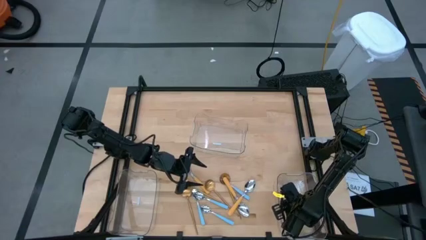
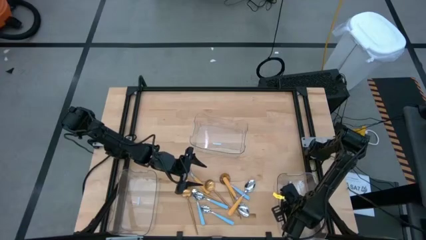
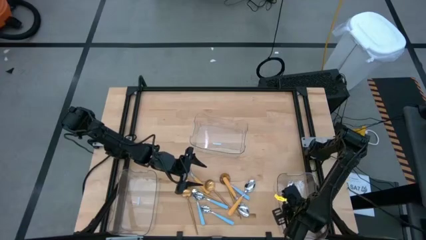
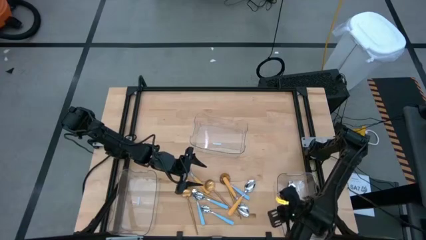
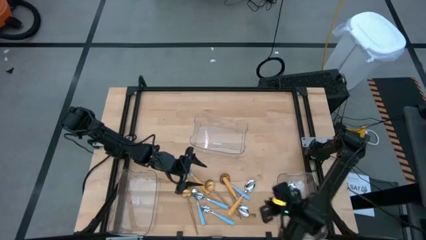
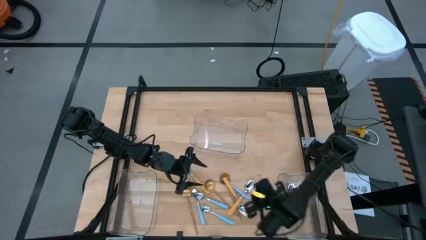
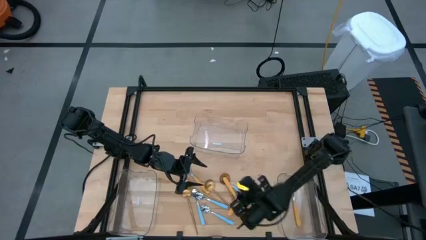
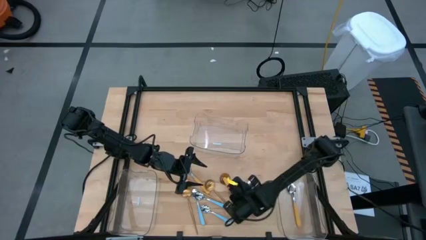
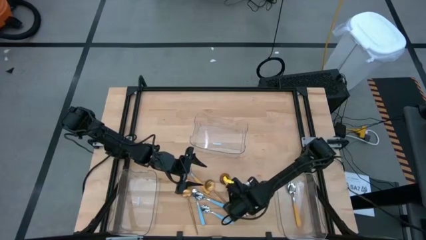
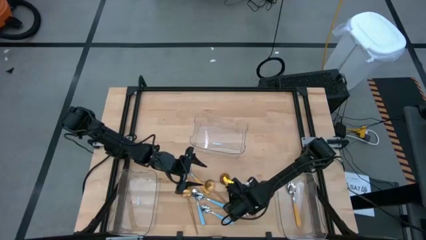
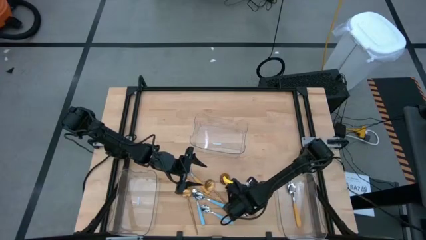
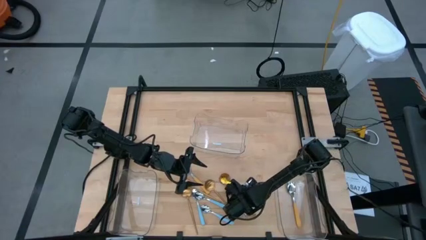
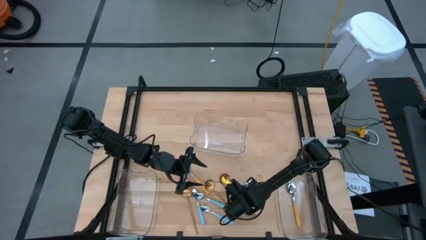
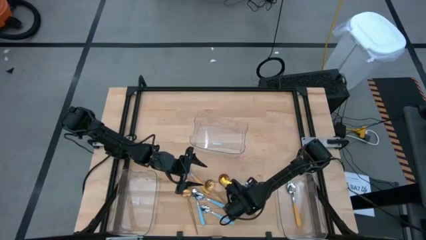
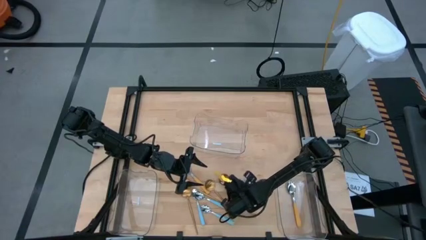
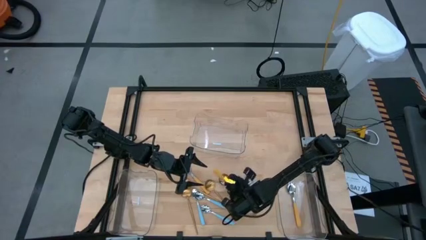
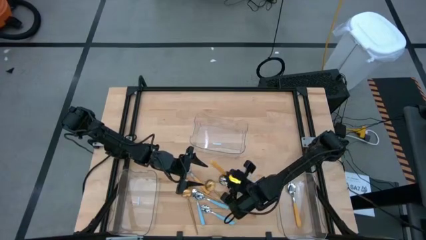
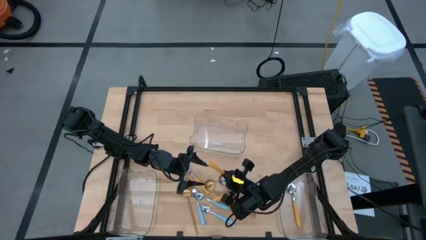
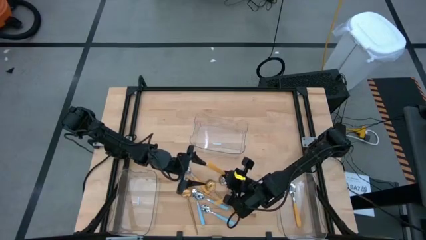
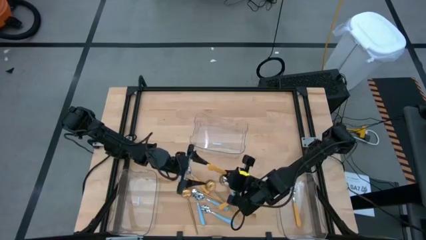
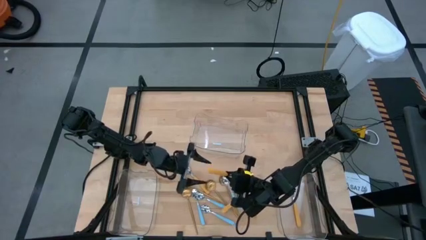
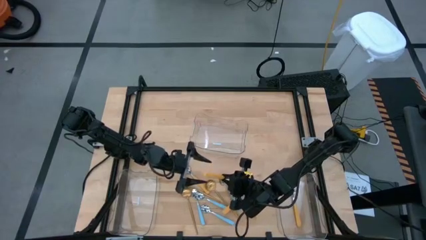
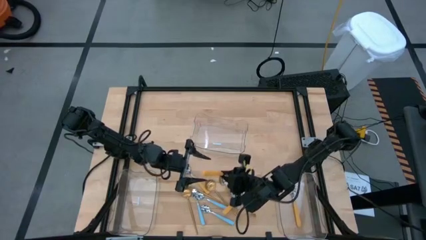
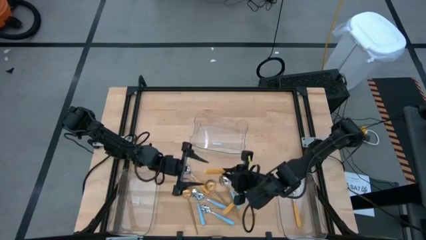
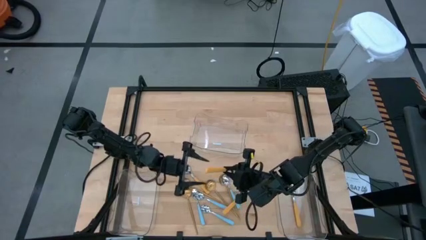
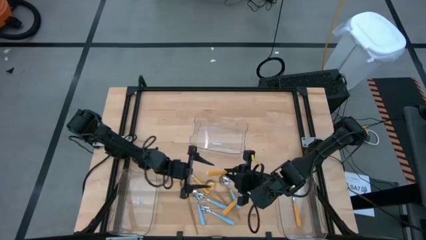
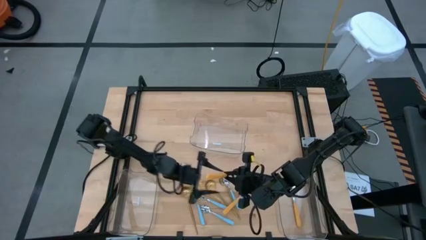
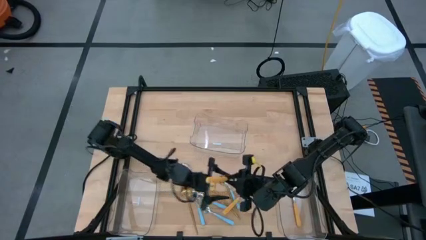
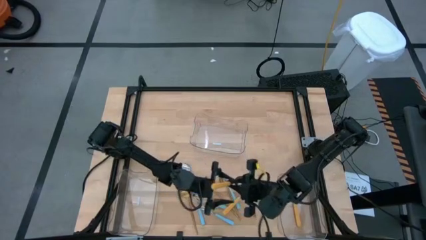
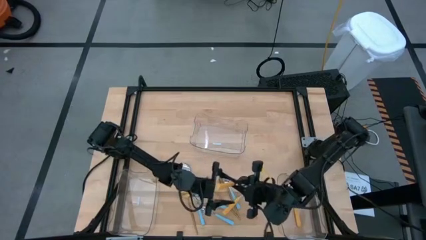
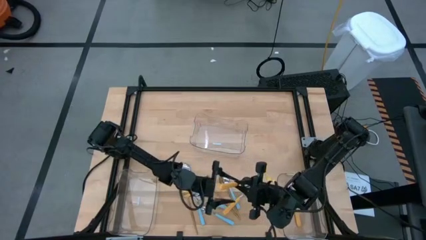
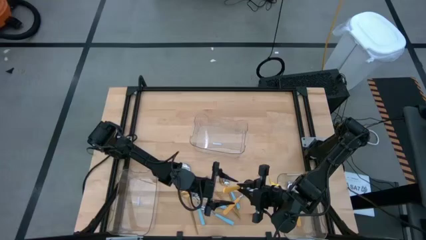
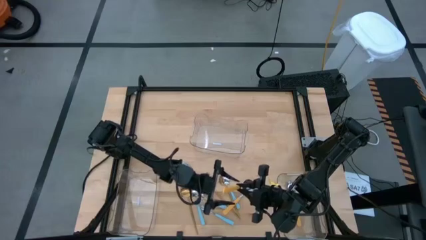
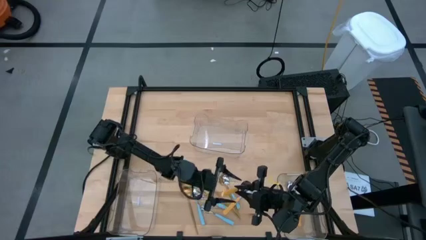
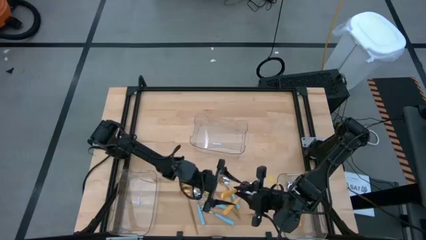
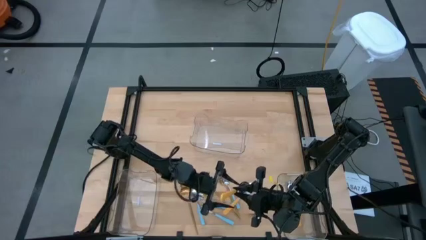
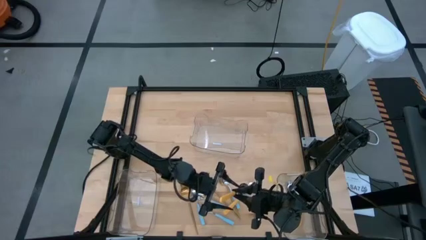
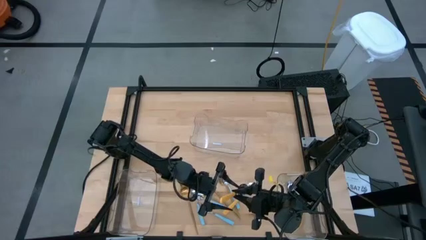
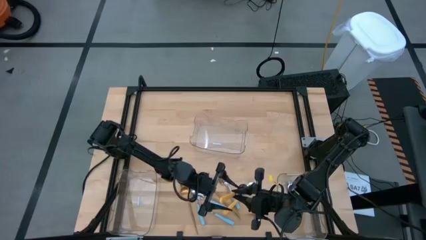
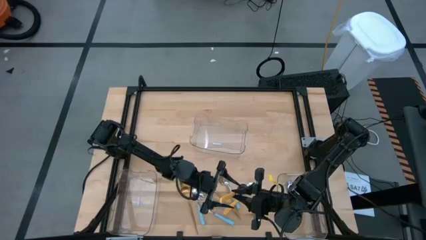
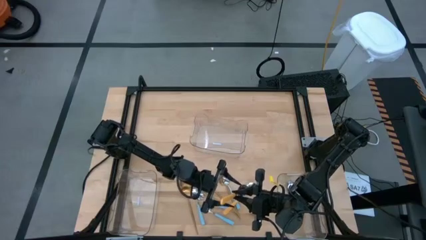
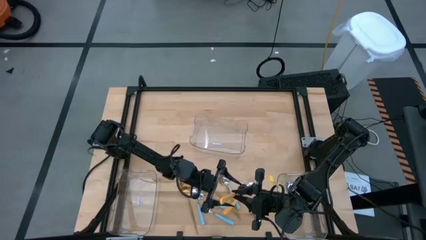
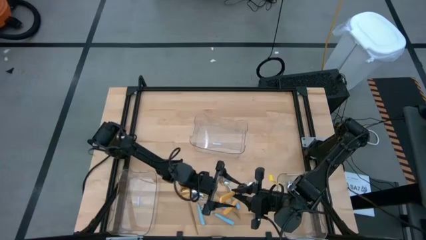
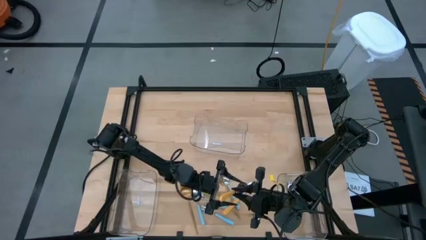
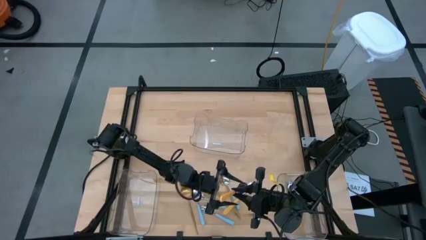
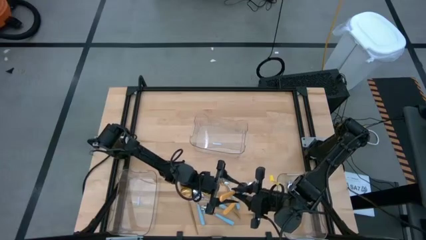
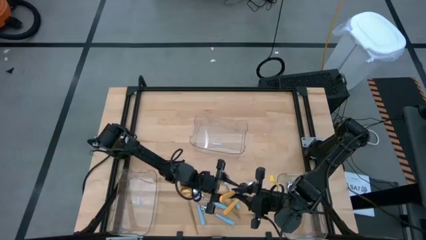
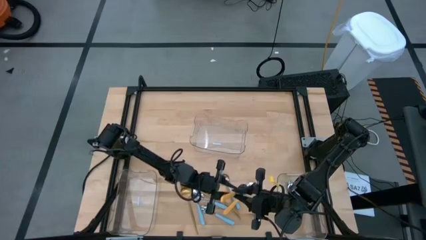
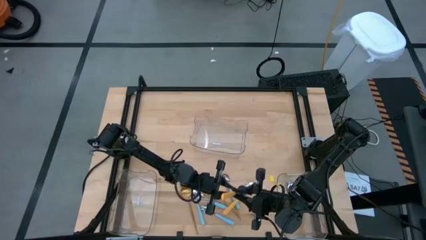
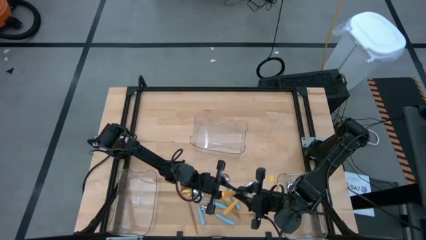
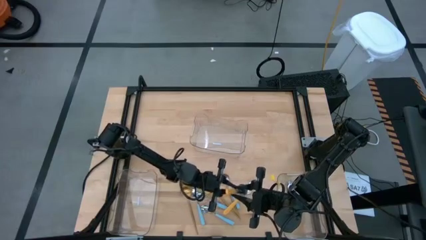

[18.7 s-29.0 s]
Task: Sort silverware by color (type)
Put the yellow spoon into the bottom right transparent bin
